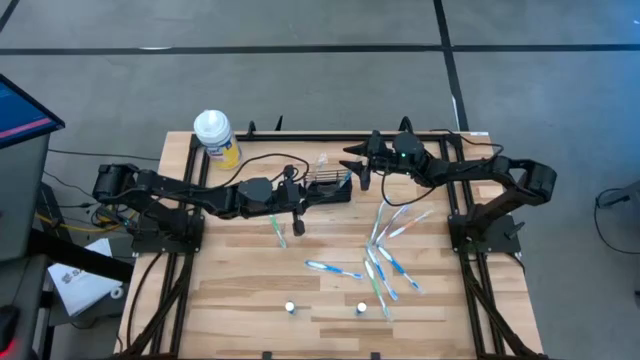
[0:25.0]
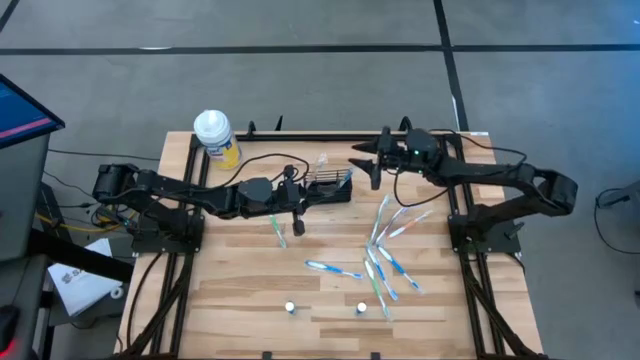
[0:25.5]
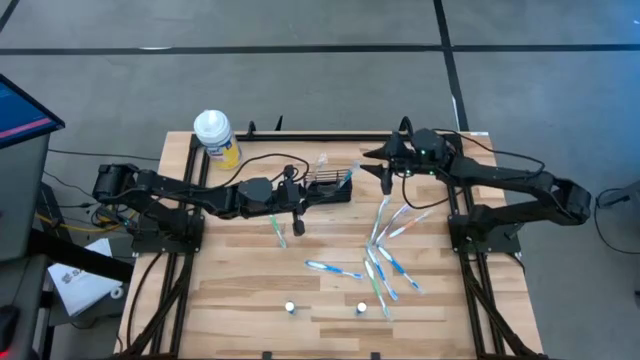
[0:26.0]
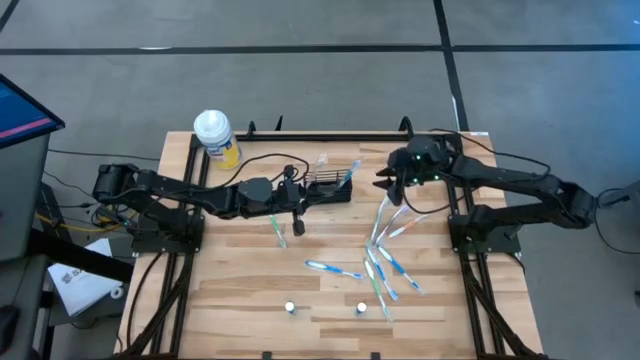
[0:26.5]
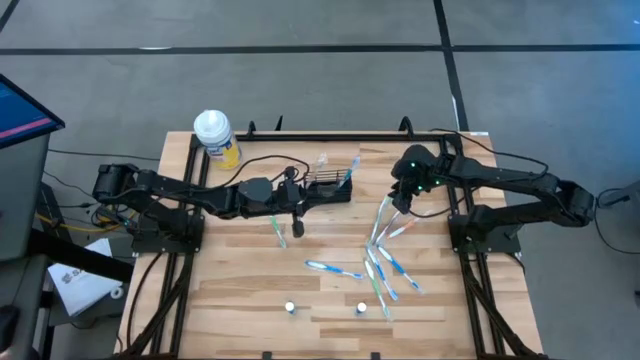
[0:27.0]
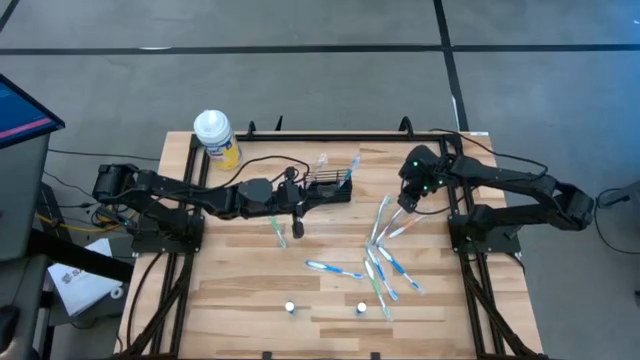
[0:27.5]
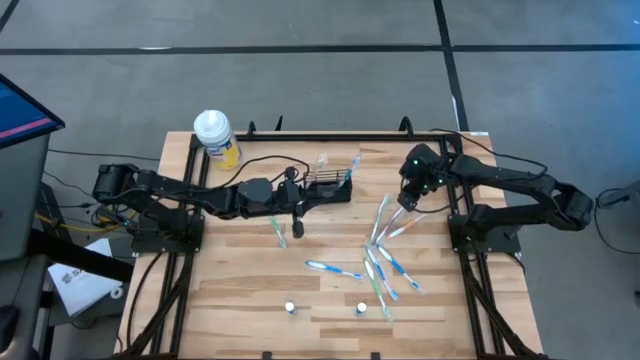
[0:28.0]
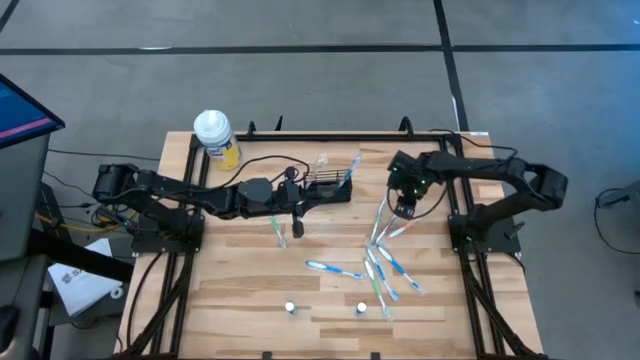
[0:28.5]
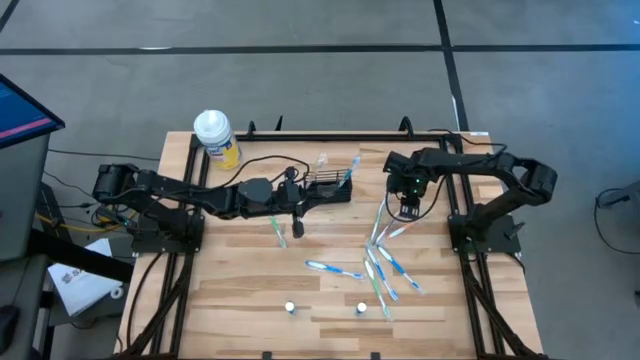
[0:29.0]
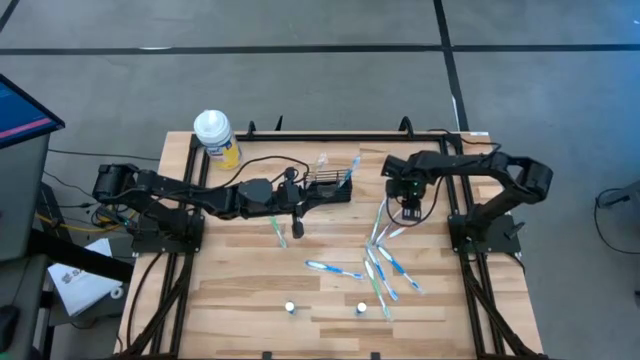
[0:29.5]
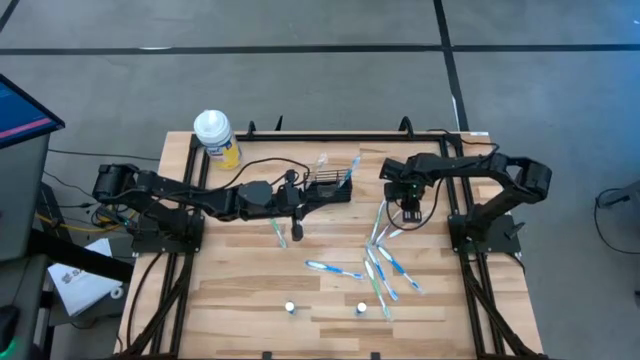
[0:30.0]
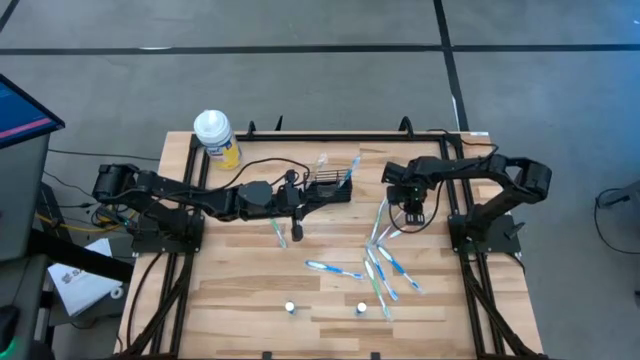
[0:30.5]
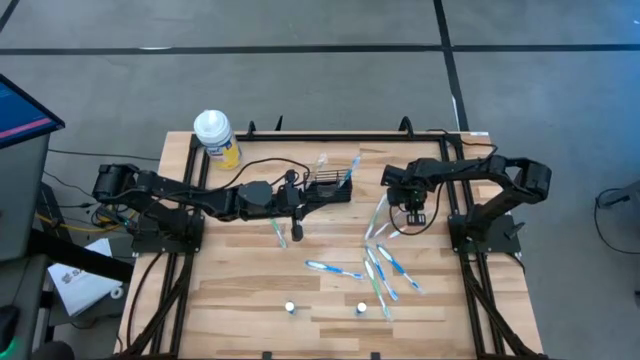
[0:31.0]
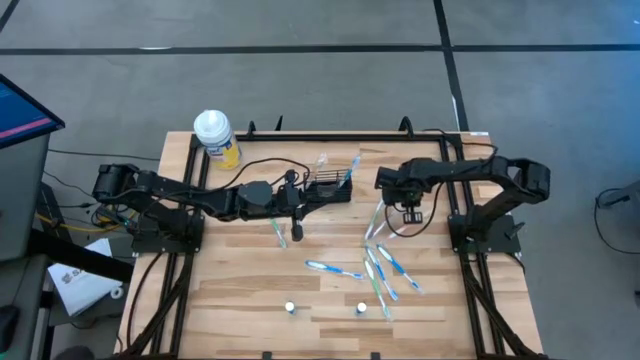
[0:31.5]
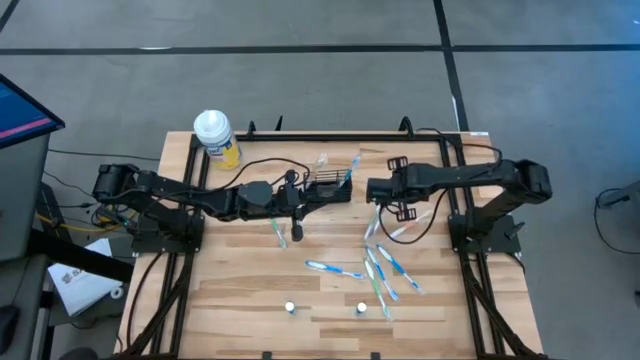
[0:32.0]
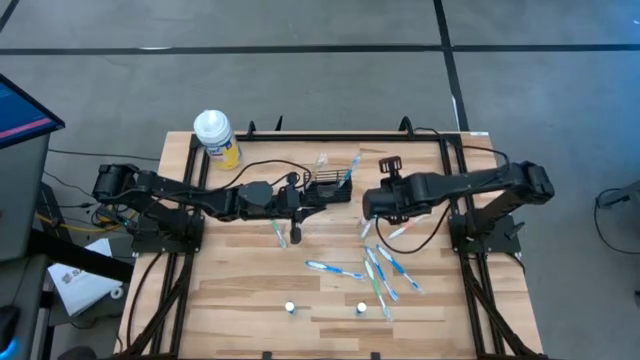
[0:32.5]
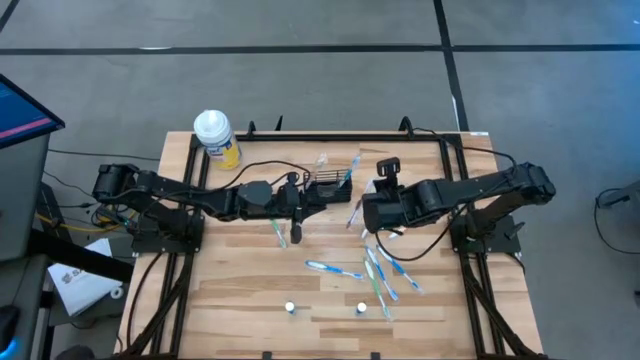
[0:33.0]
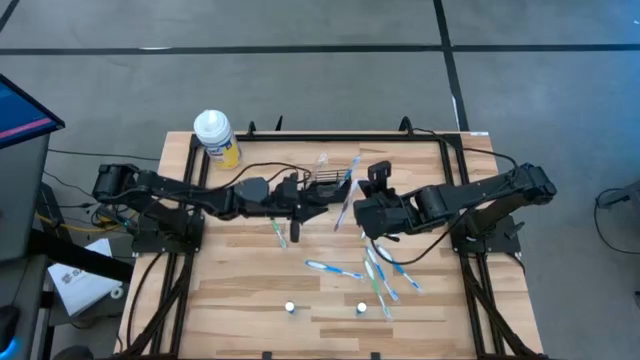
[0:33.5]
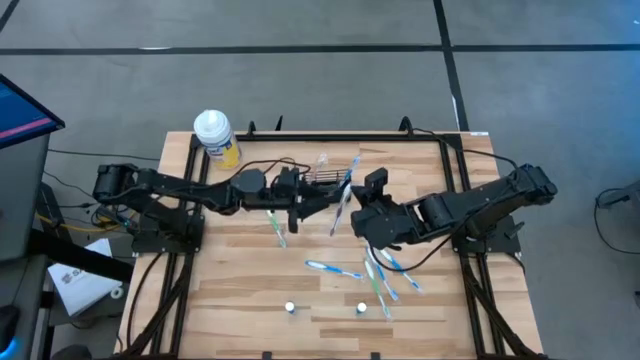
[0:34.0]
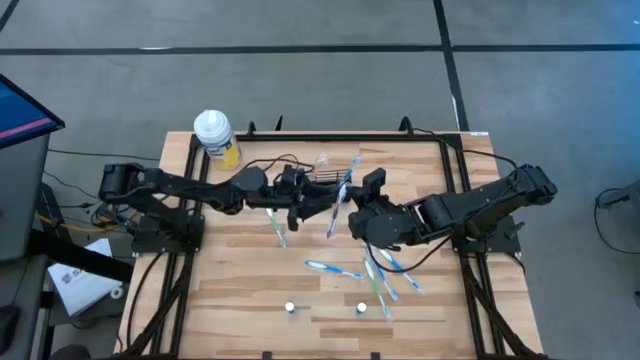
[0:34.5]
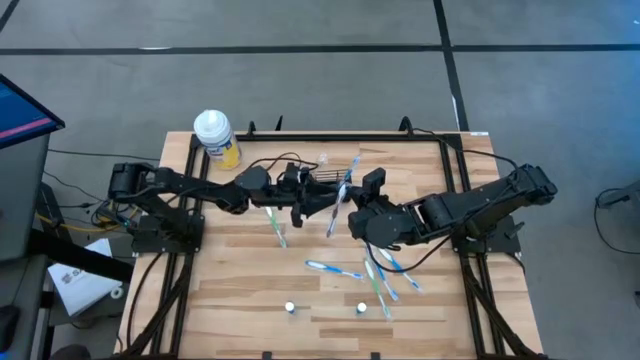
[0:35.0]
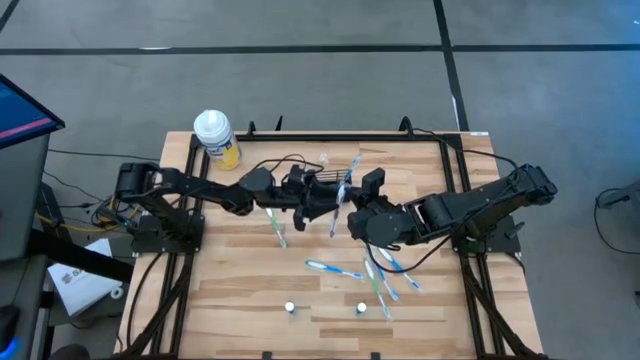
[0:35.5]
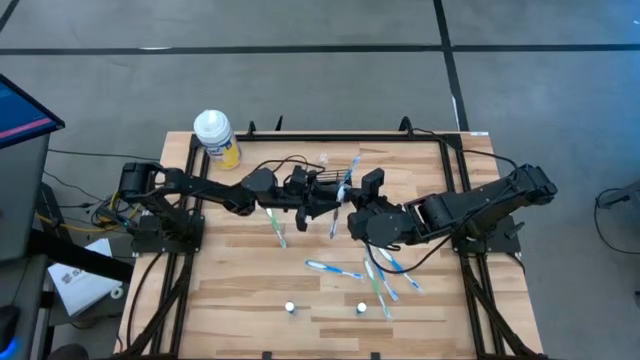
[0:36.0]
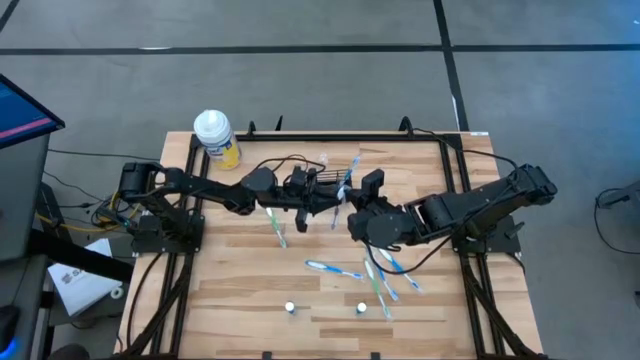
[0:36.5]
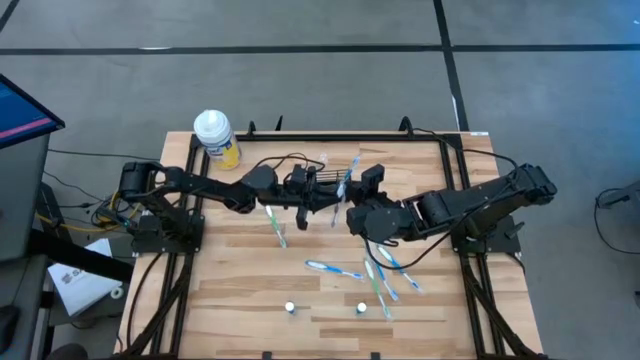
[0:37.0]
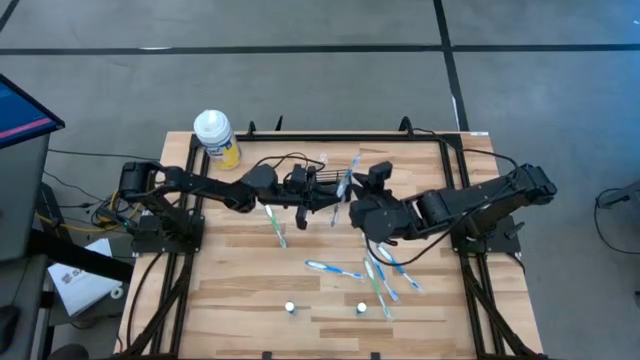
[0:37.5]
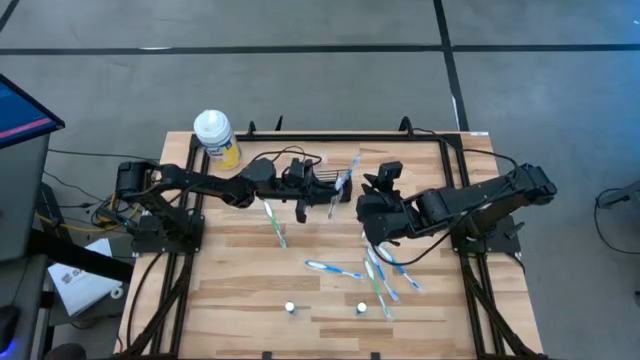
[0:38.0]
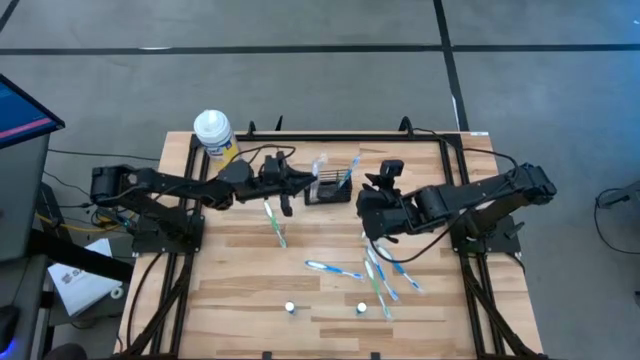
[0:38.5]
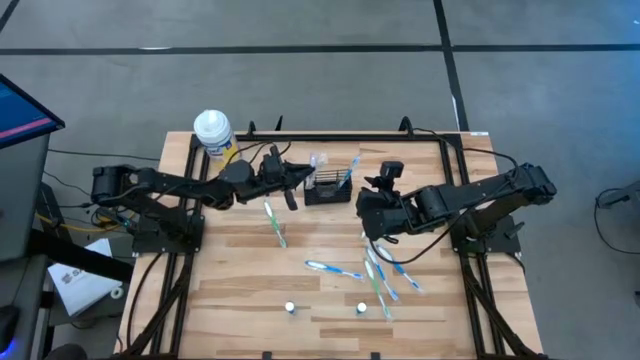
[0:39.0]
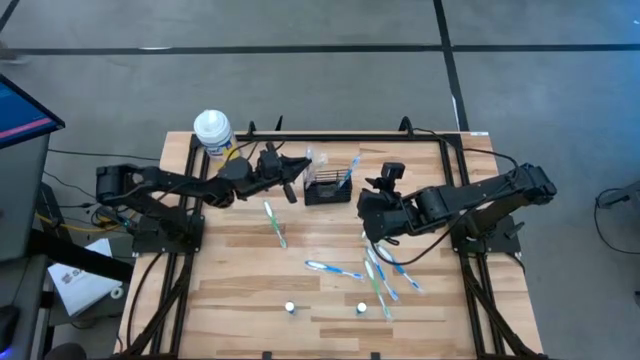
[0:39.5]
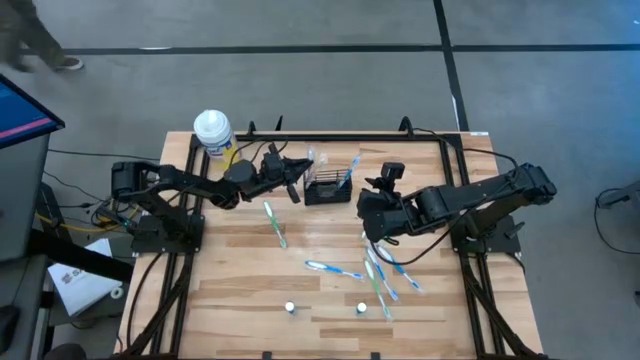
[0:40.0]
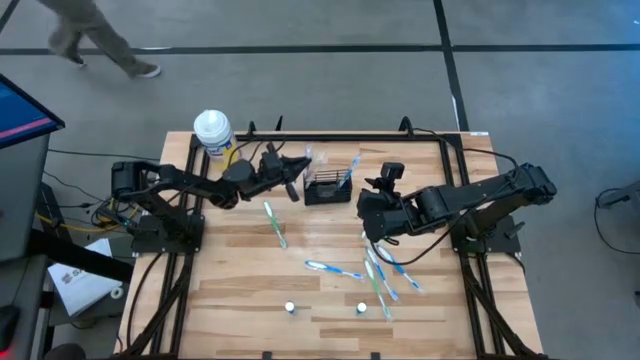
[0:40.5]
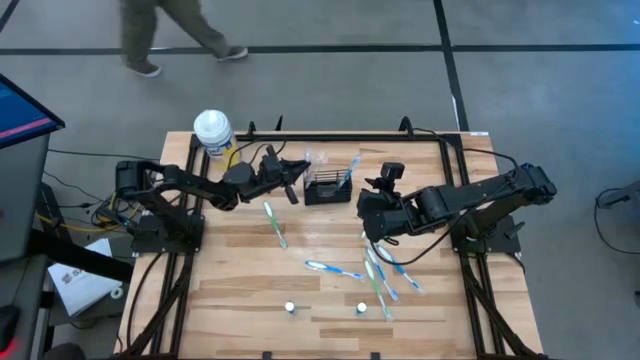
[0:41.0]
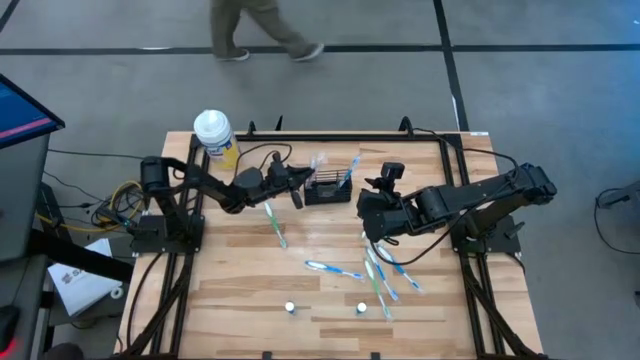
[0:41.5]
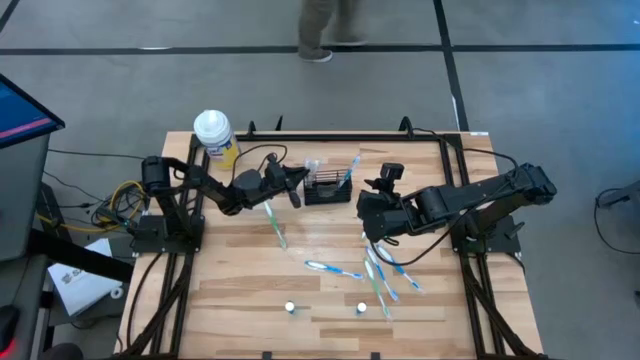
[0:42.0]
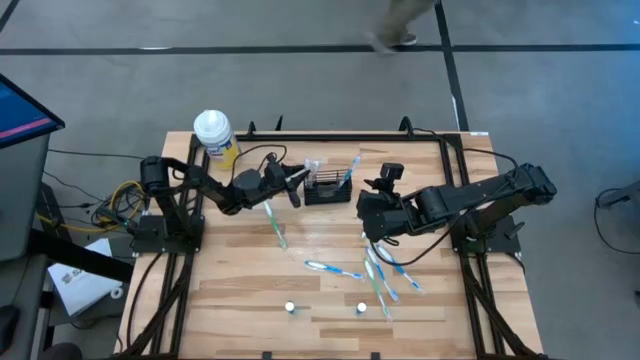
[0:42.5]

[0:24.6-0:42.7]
Task: Pick & Place toothbrushing station
Put the purple toothbrush into the black mesh organizer

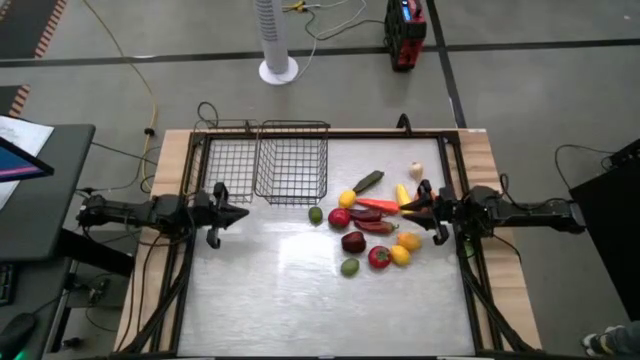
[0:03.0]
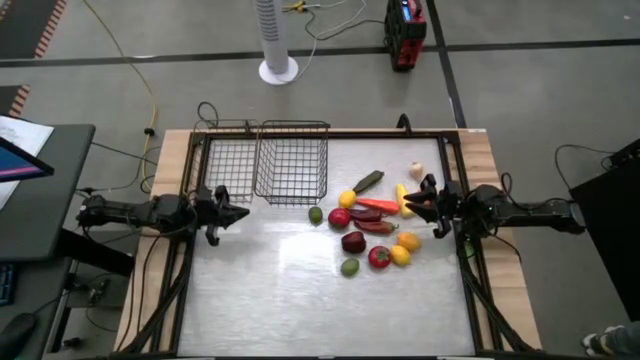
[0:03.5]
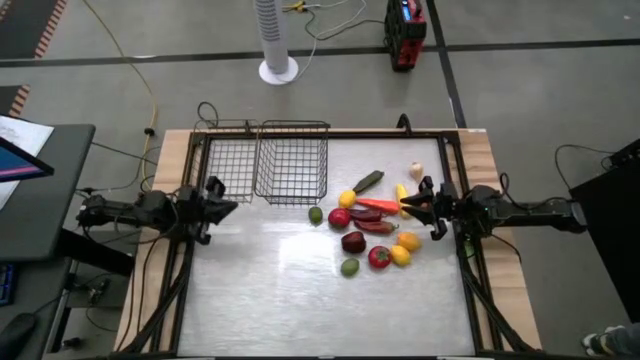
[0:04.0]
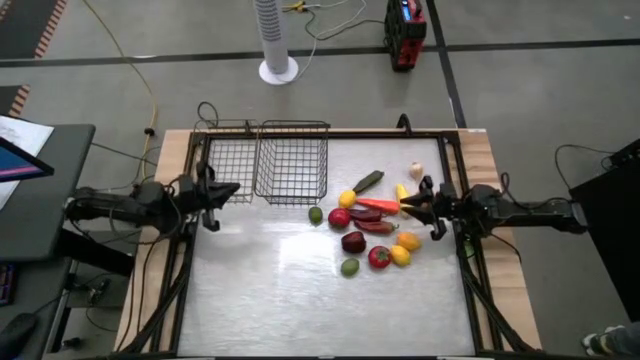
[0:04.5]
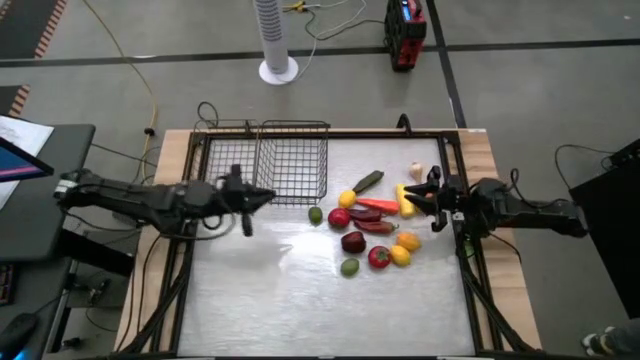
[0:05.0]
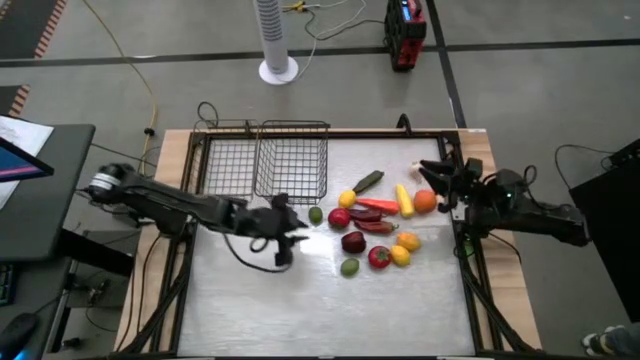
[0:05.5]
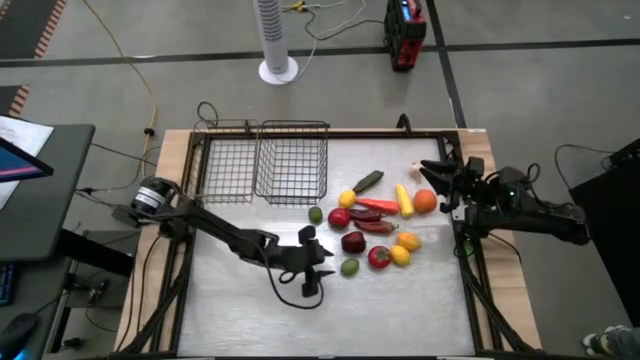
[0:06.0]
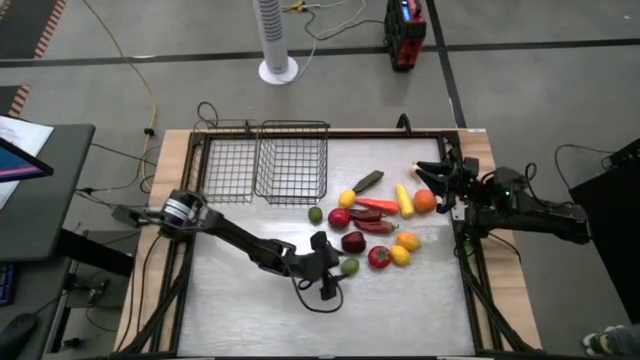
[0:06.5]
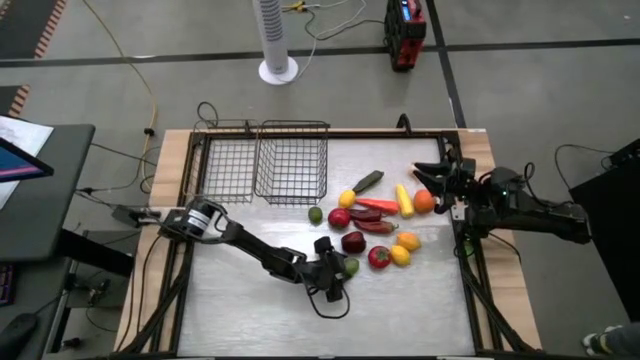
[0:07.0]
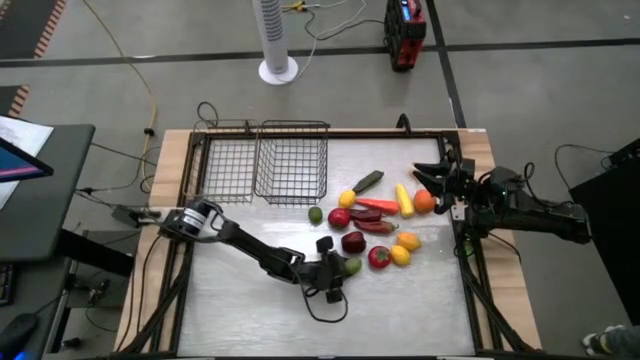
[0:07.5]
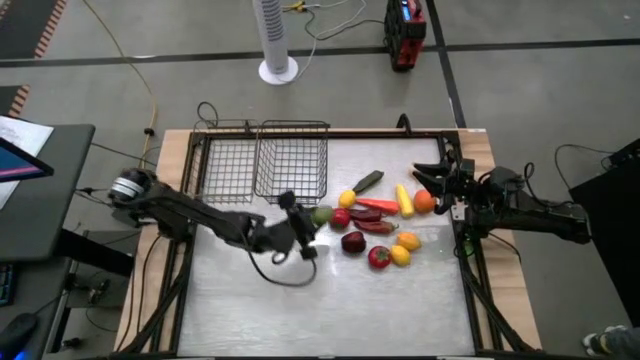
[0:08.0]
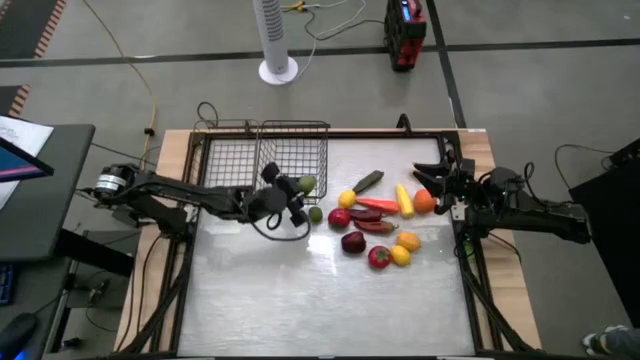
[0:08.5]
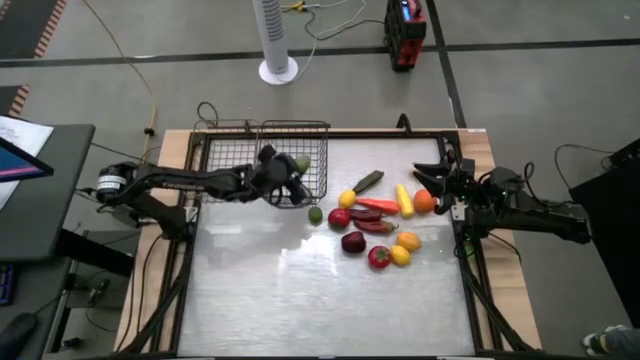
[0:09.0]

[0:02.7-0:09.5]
Task: Sort produce into baskets
Put the bottom lime into the right wire basket
